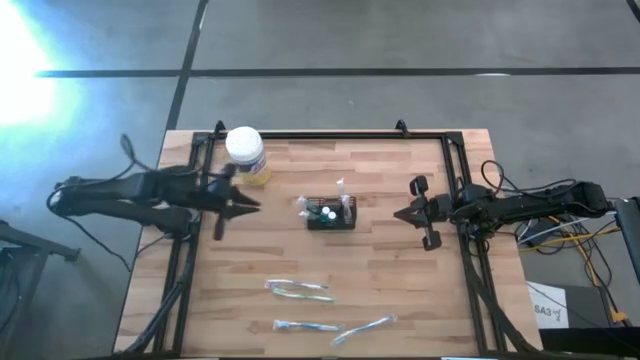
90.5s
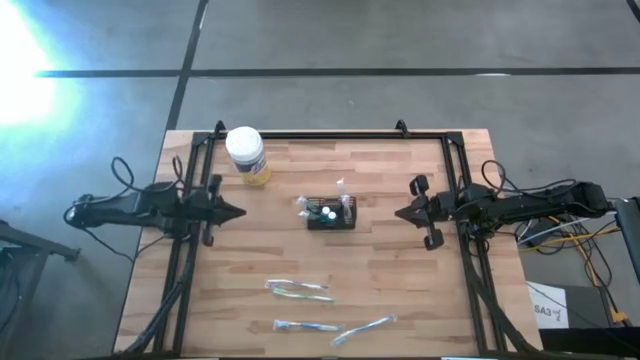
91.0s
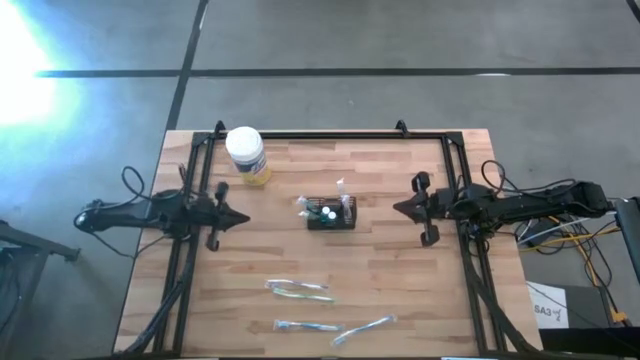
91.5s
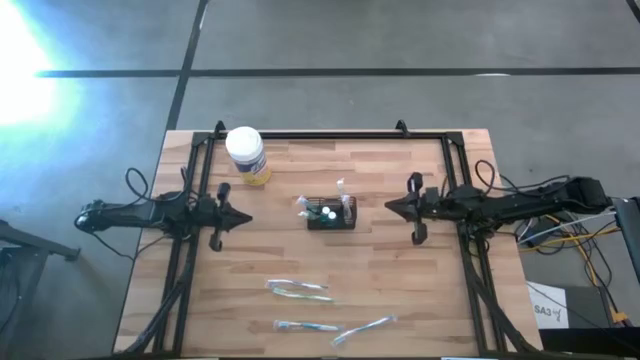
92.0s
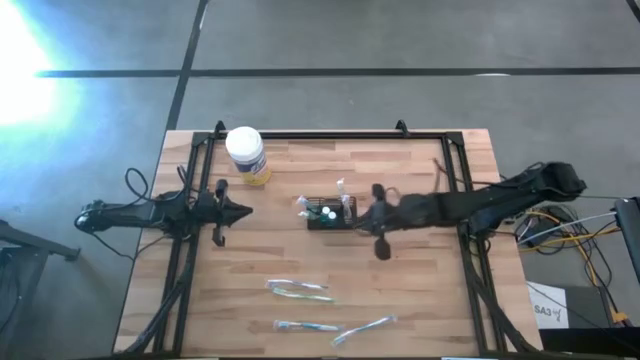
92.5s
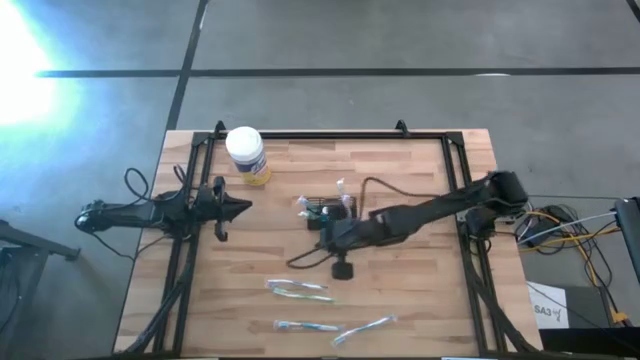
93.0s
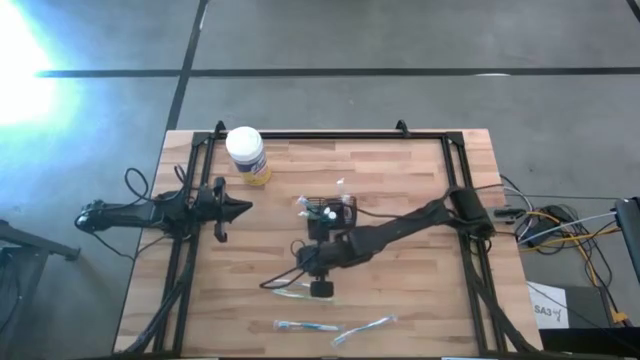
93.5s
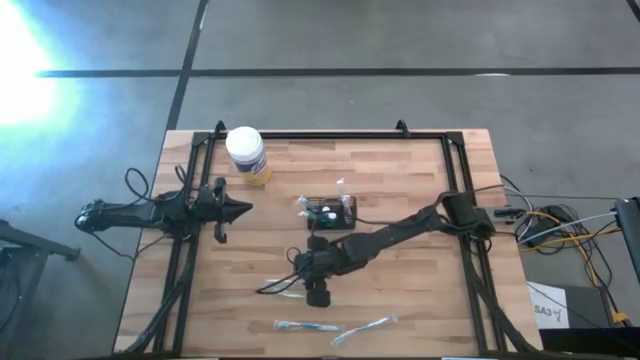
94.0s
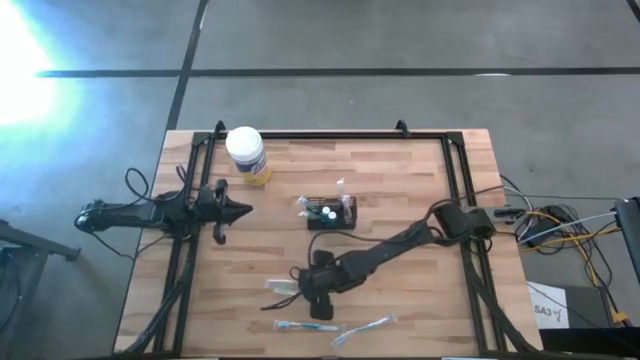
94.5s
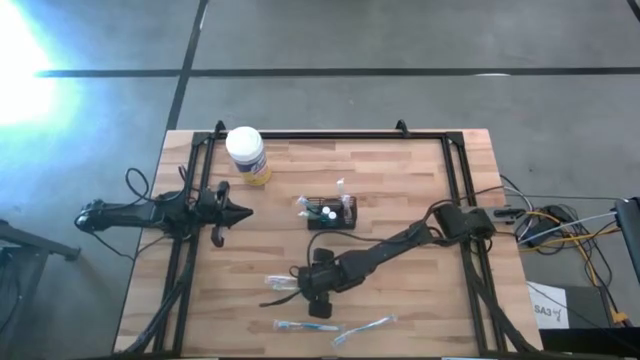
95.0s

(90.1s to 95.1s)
Task: Pick & Place toothbrushing station
Put the purple toothbrush into the black wire organizer

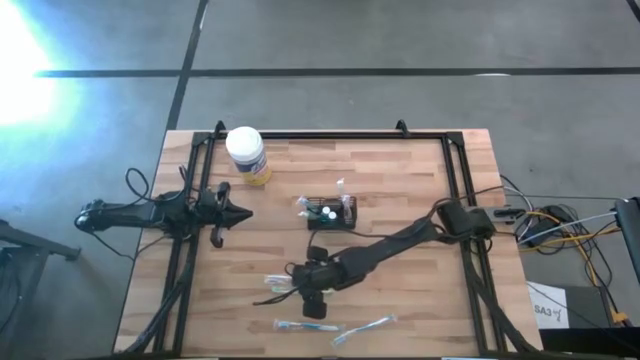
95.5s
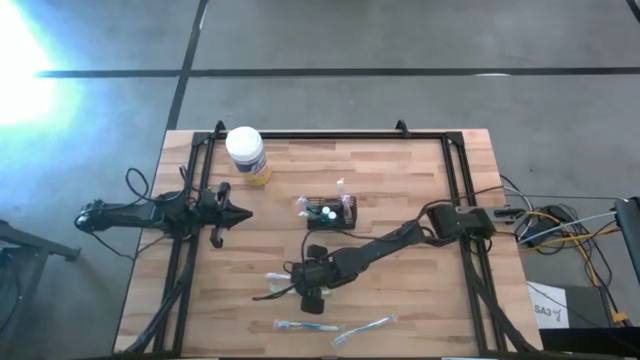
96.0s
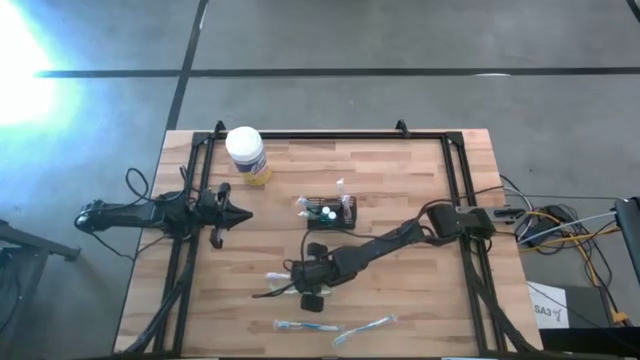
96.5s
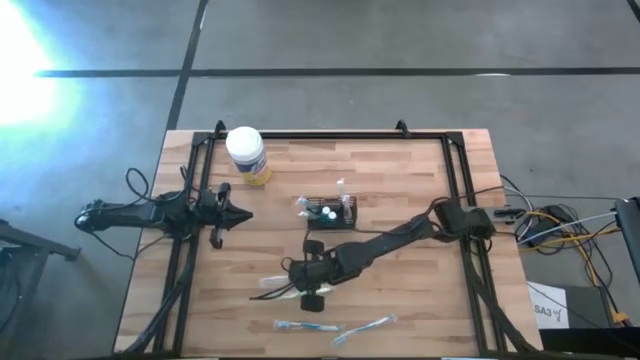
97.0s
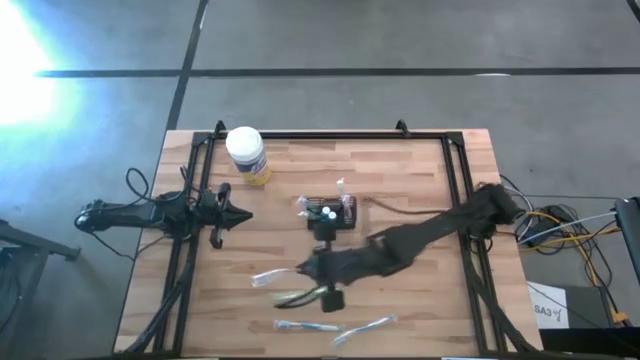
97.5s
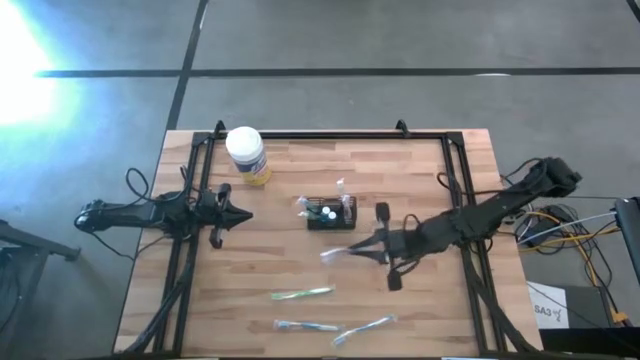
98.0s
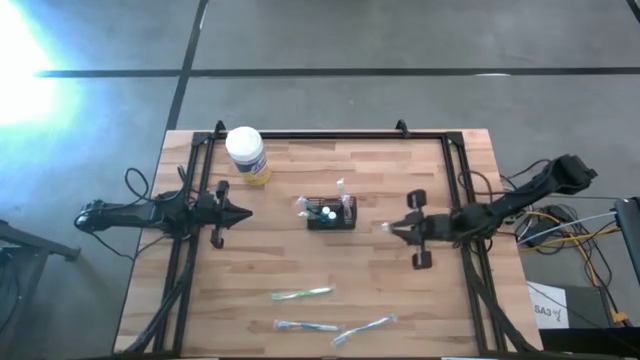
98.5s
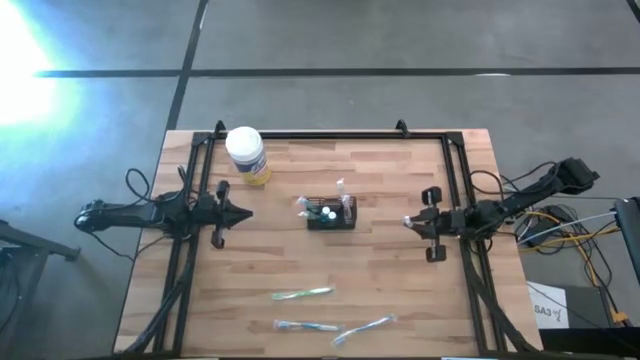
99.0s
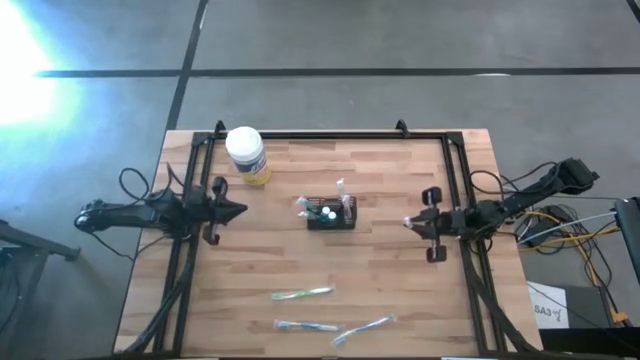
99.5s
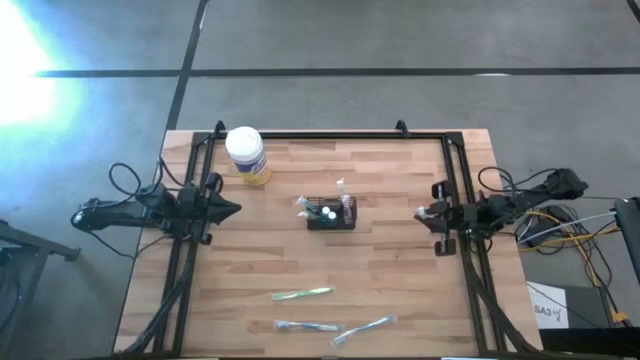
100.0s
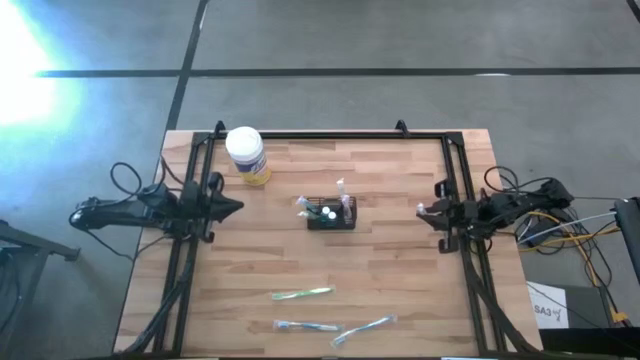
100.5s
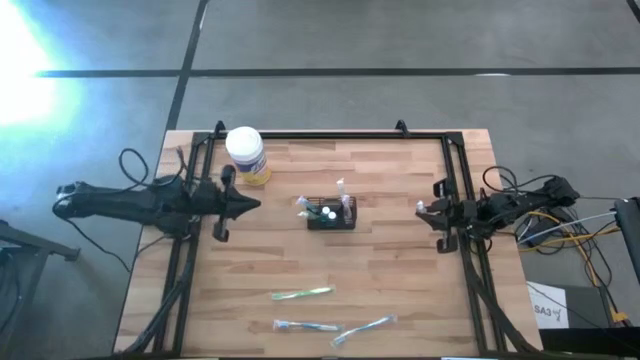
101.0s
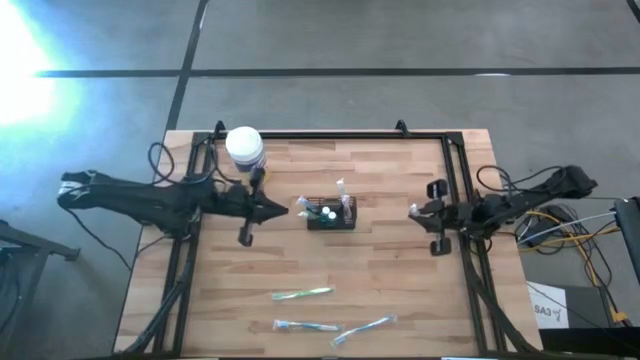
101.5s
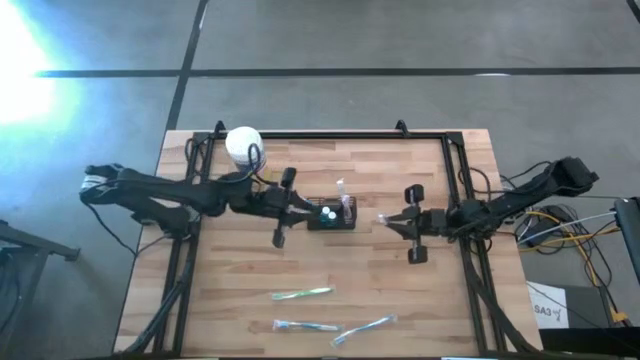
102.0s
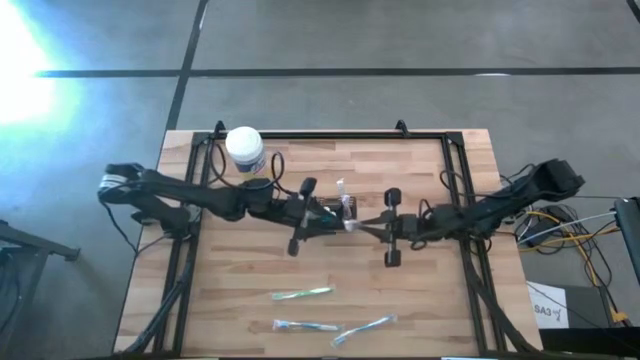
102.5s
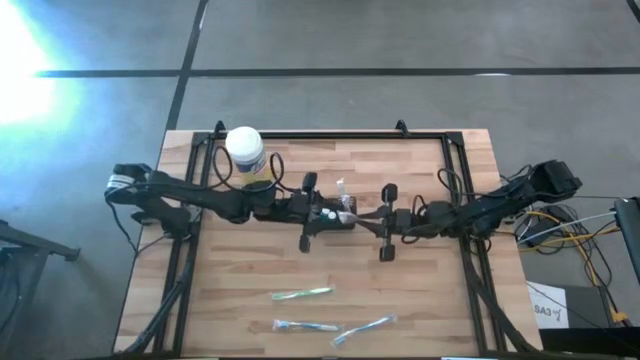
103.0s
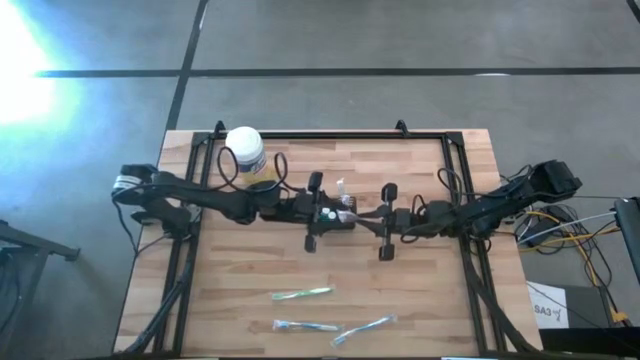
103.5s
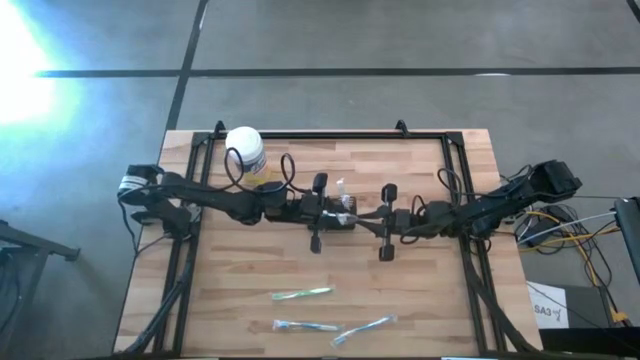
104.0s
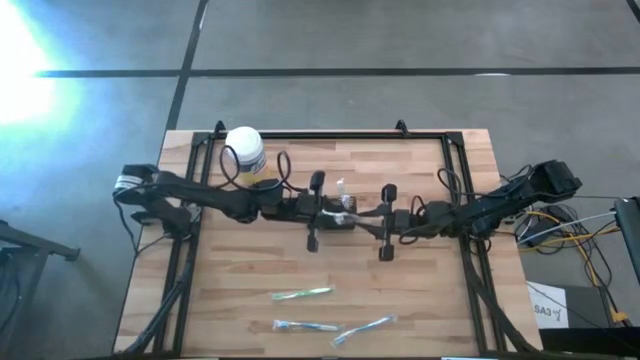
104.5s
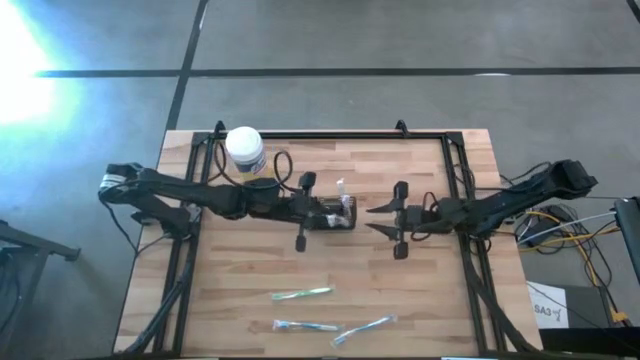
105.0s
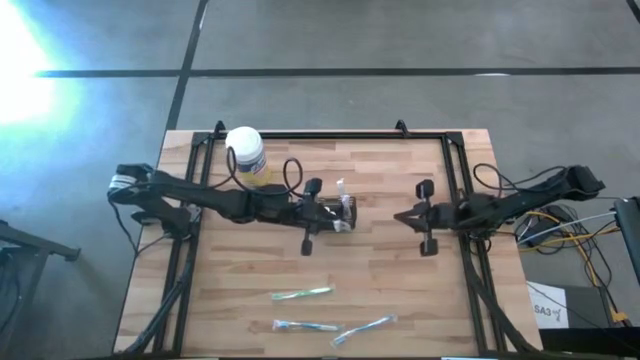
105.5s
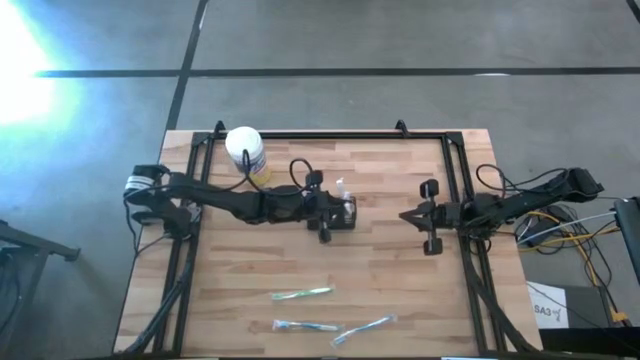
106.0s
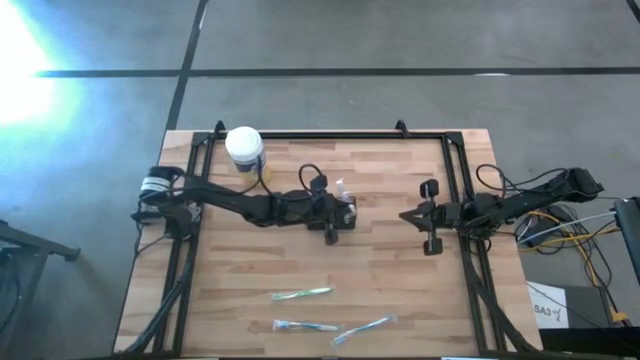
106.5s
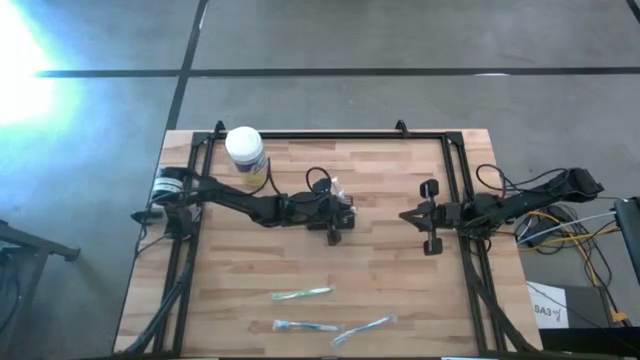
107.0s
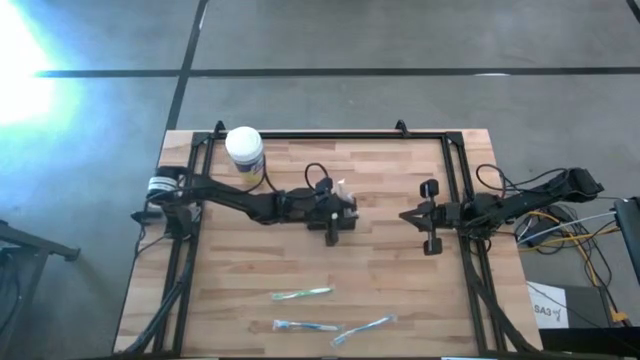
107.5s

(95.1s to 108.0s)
Put the purple toothbrush into the black wire organizer

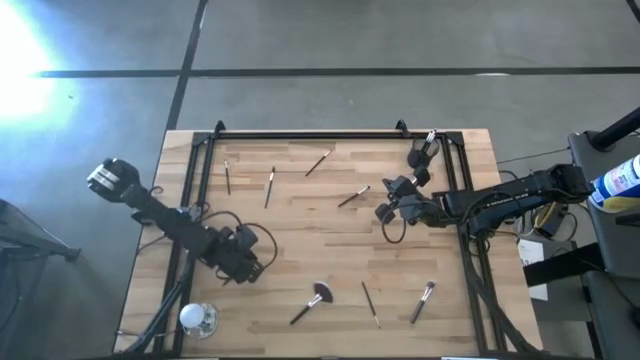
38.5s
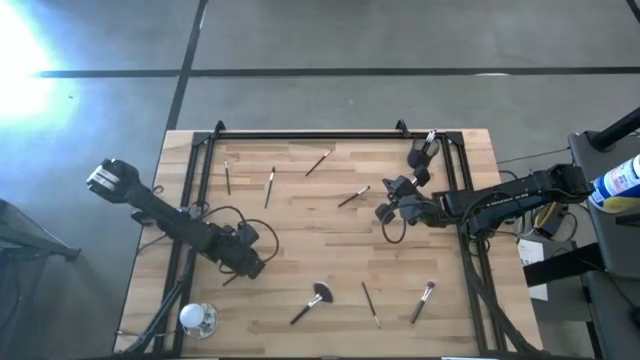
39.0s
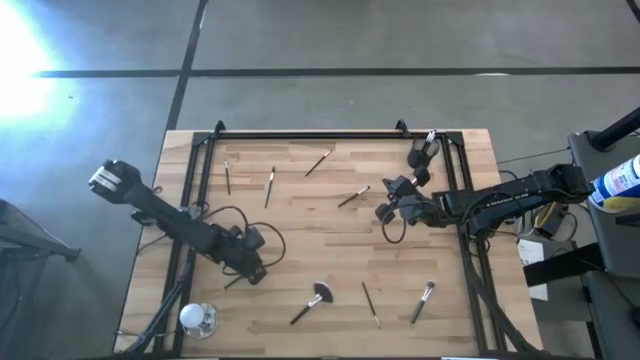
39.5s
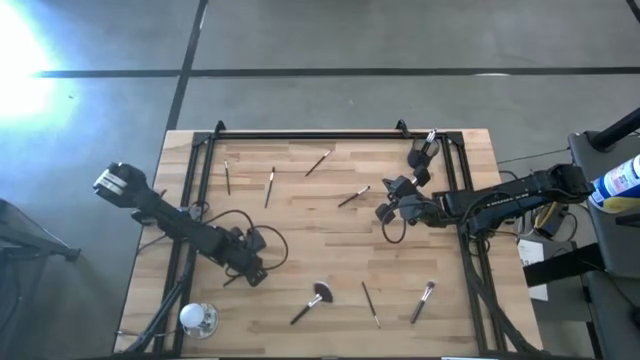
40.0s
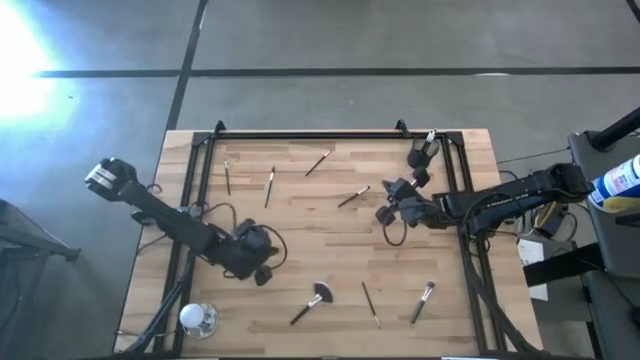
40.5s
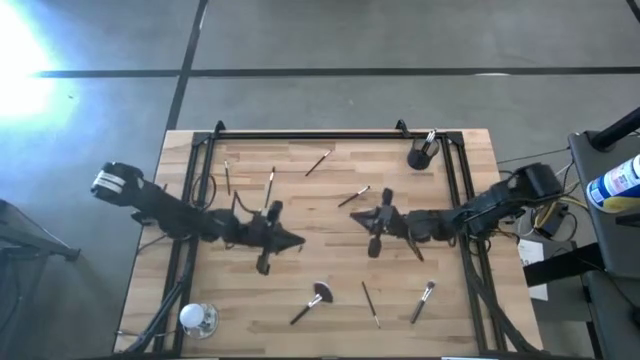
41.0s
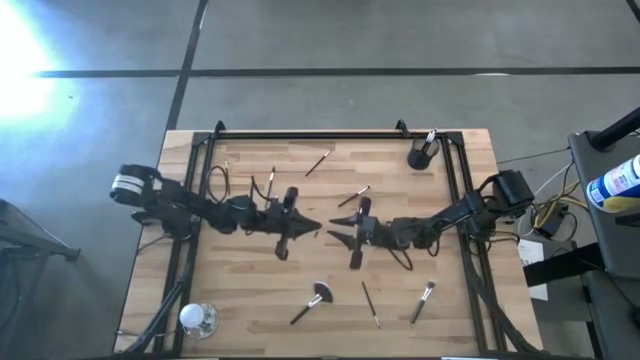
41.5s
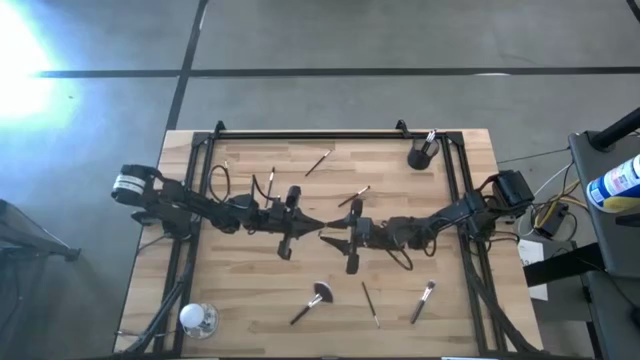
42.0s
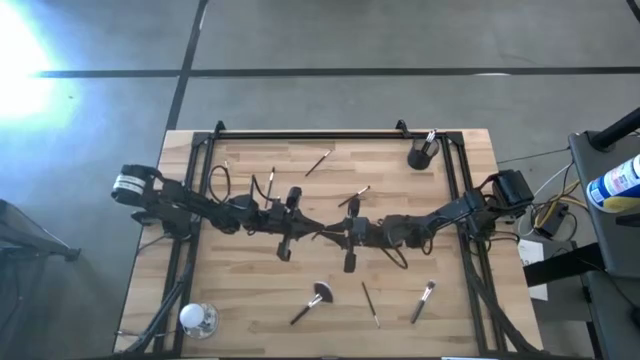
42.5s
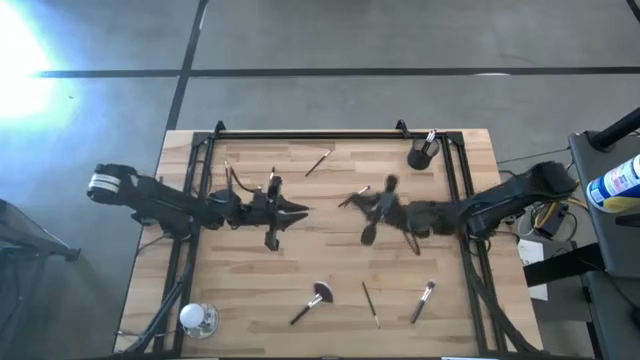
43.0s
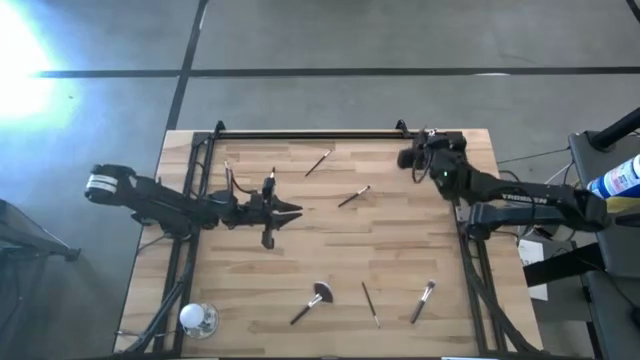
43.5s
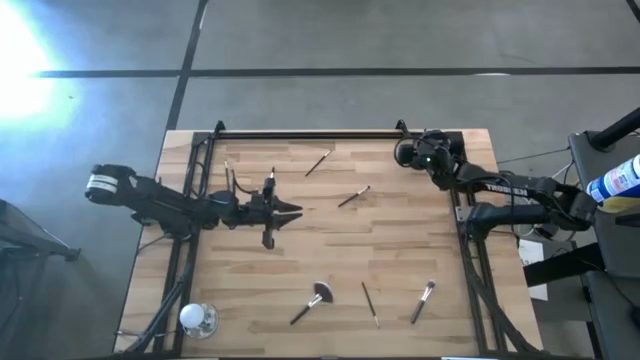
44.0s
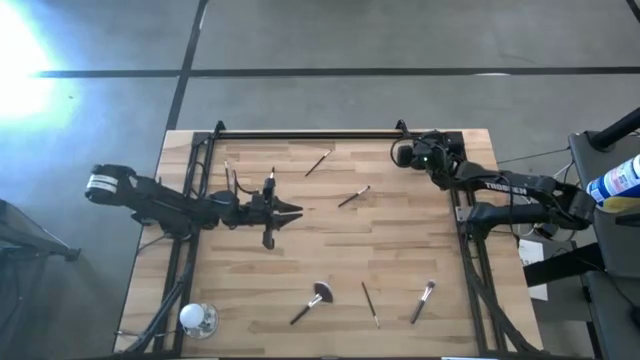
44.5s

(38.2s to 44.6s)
Task: Put items in baskets/containers
Put the eyeshadow brush into the pen holder
